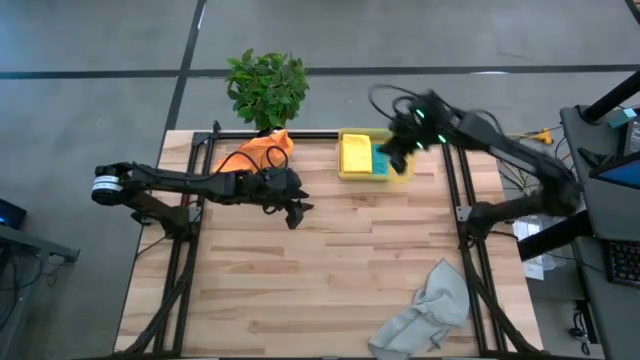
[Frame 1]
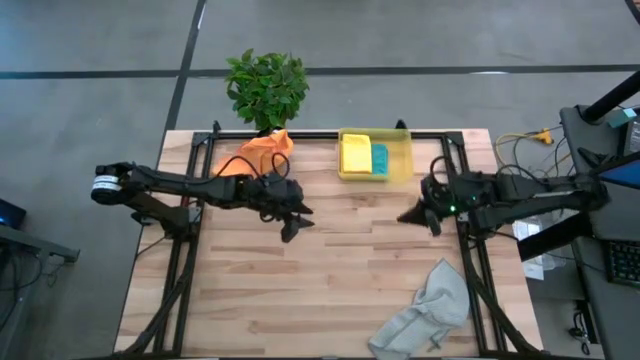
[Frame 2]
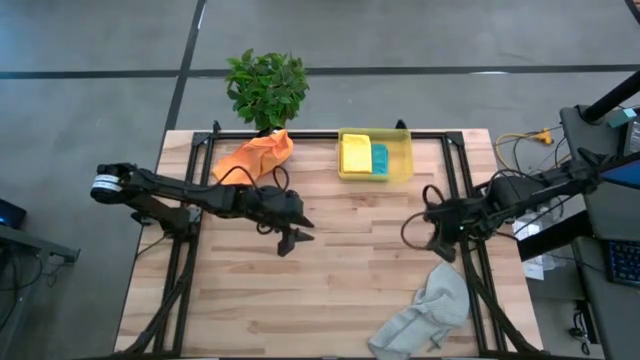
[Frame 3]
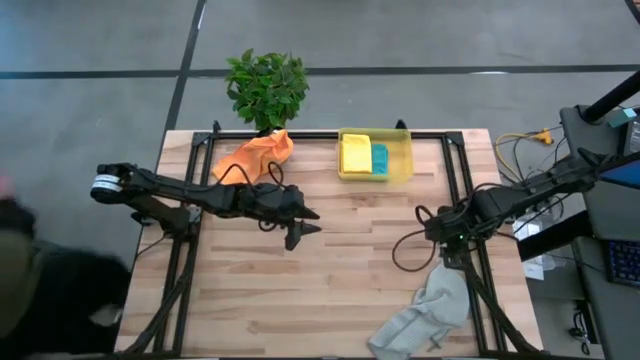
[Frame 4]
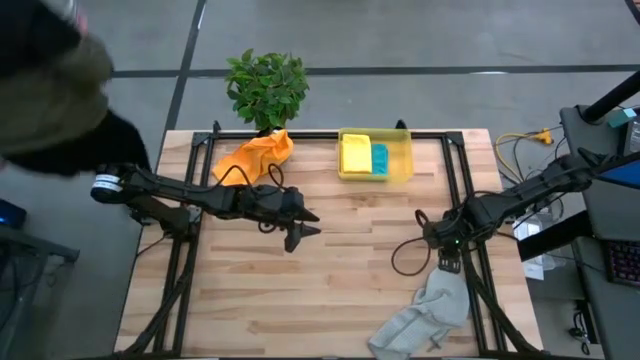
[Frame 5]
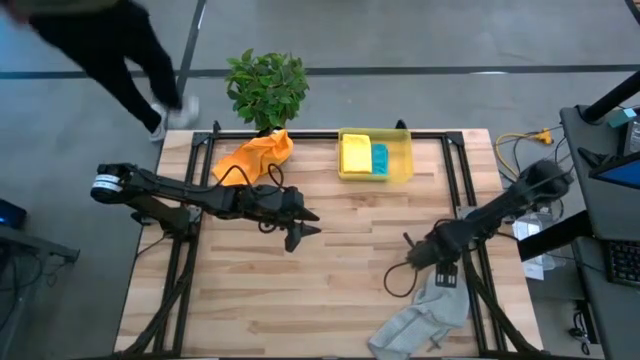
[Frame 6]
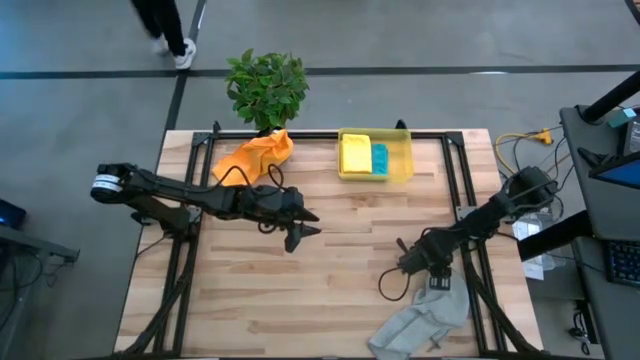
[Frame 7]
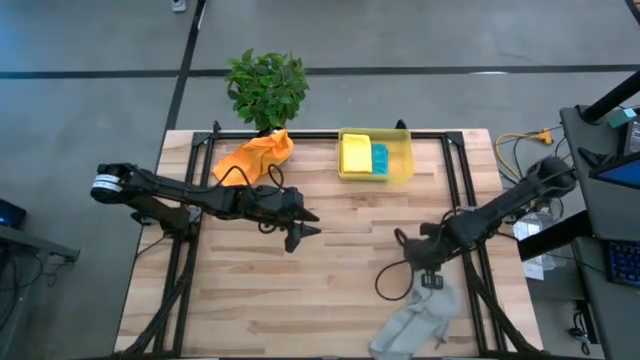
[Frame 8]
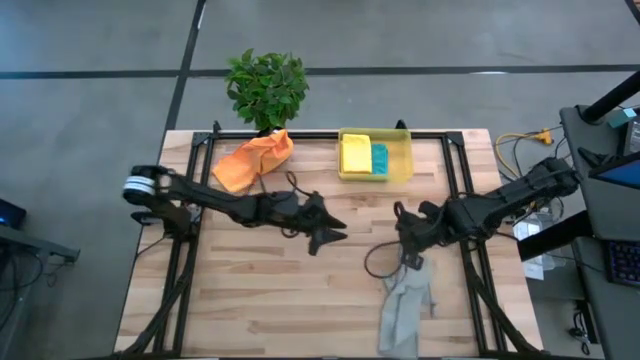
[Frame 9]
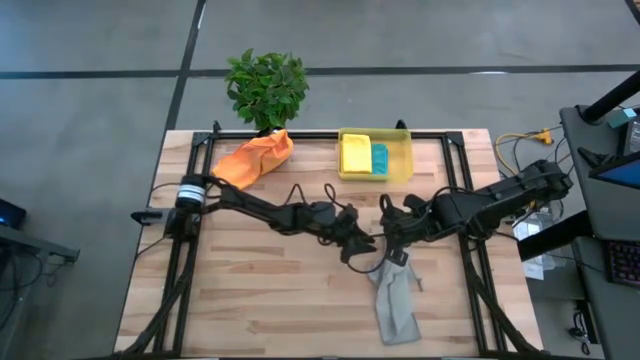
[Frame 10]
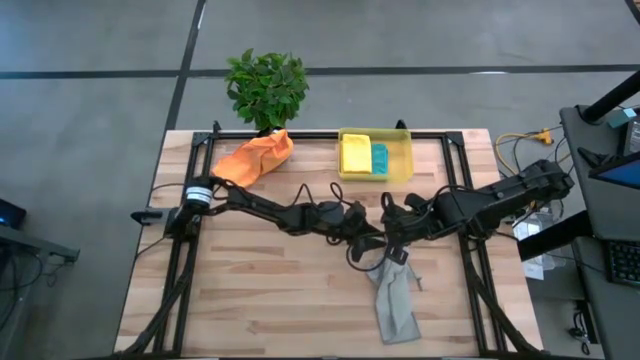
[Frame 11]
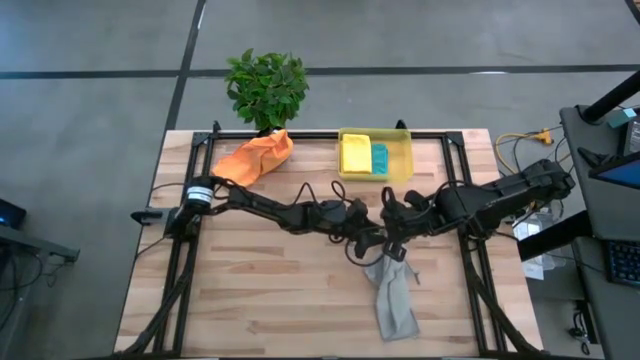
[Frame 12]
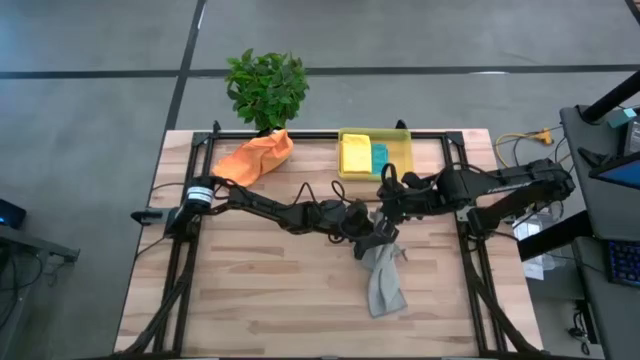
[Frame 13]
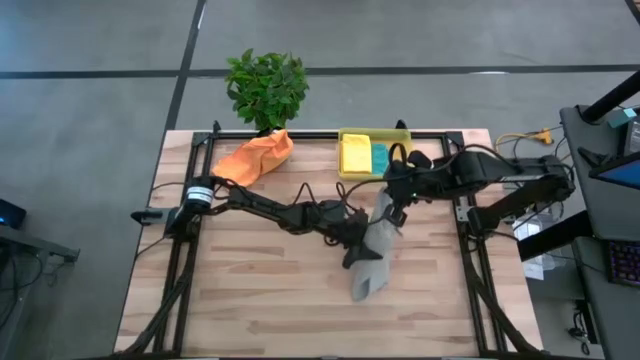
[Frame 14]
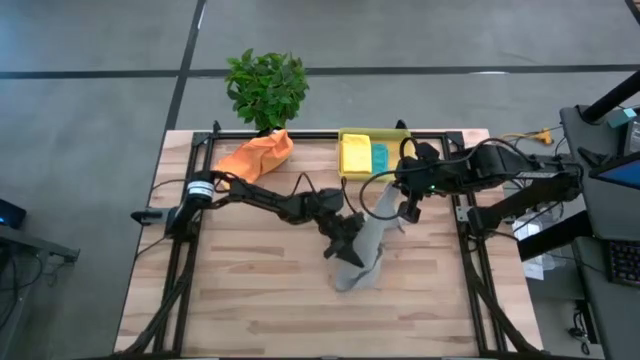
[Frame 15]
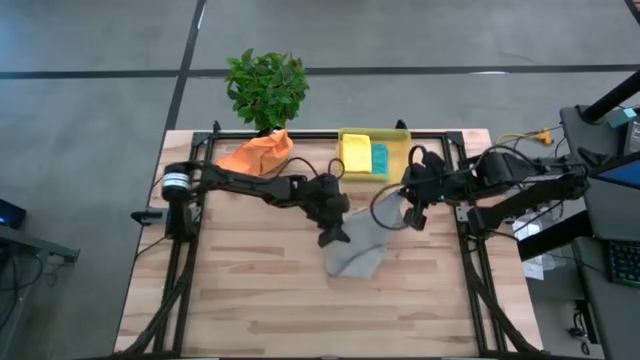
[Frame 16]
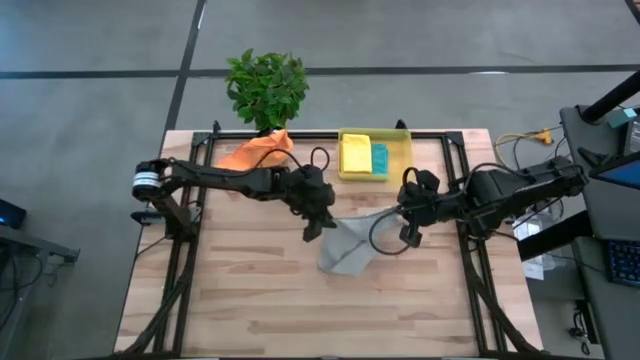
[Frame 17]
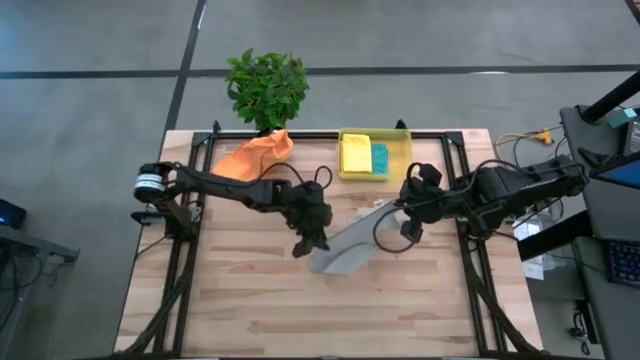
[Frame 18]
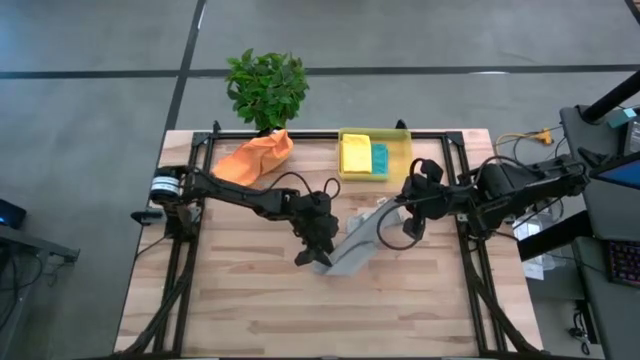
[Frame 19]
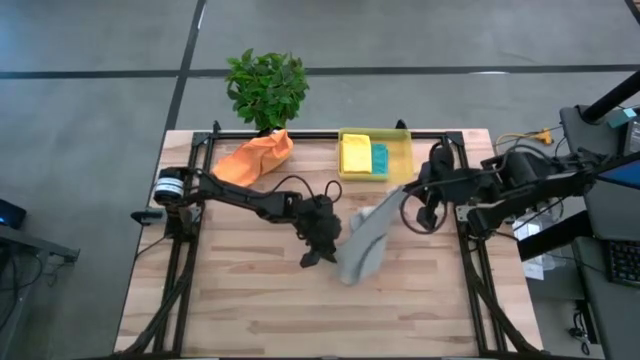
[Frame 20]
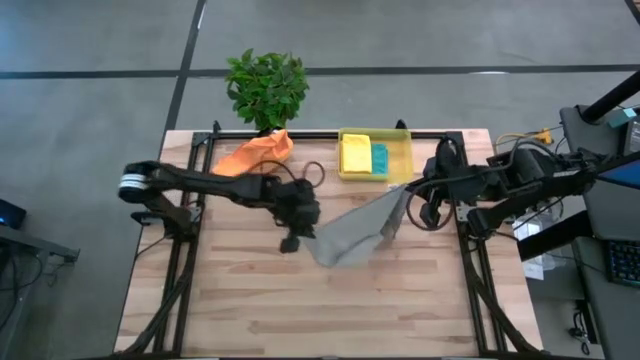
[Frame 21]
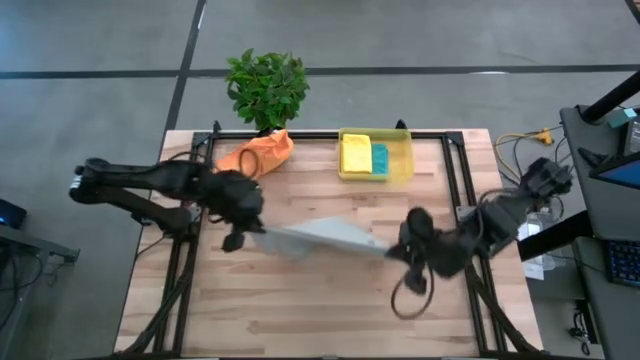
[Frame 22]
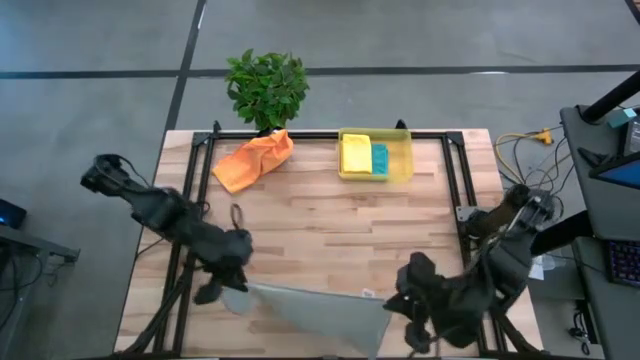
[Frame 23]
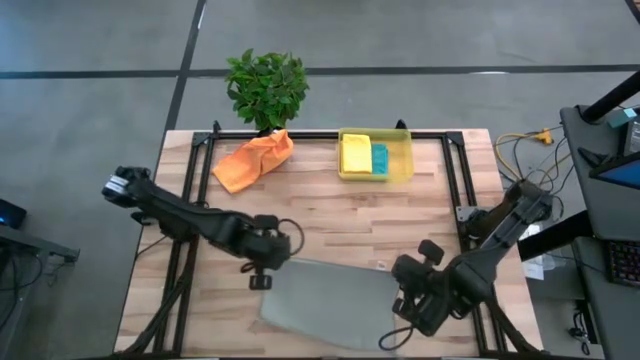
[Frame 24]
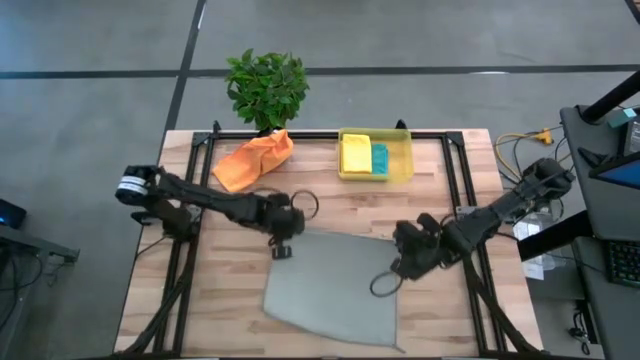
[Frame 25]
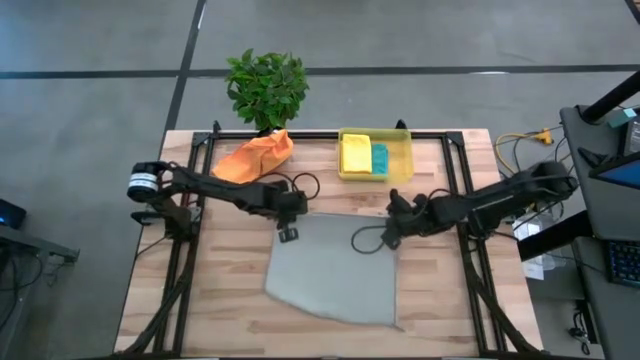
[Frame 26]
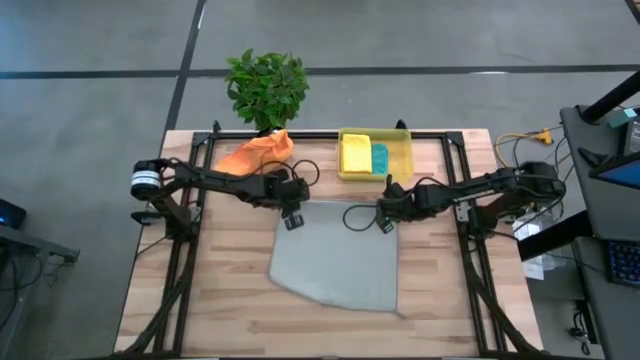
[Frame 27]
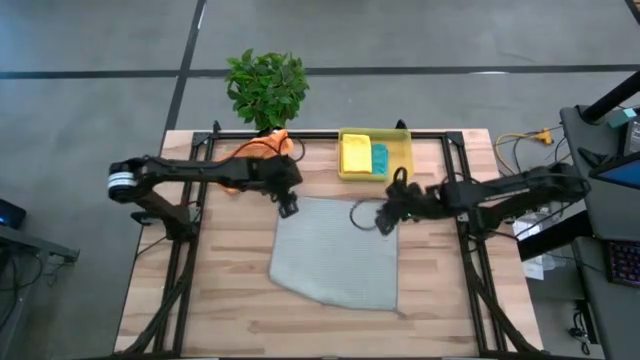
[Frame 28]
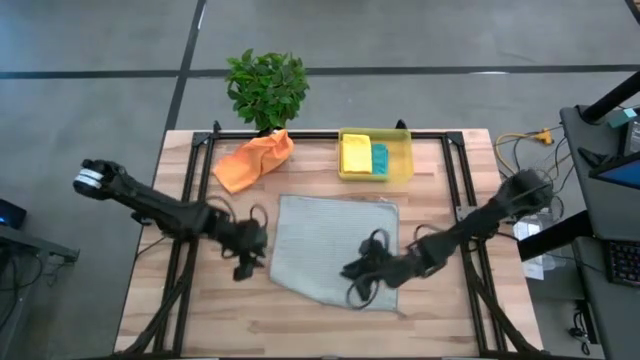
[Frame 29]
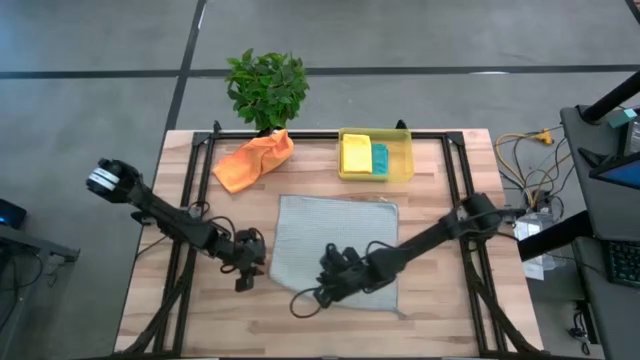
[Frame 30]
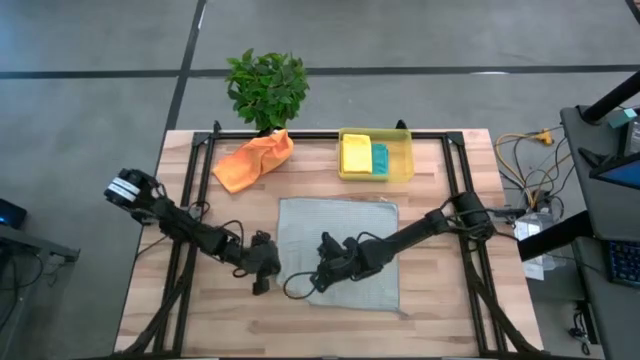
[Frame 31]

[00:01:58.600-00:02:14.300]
Task: Fold microfiber towels
Fold the gray microfiber towel
